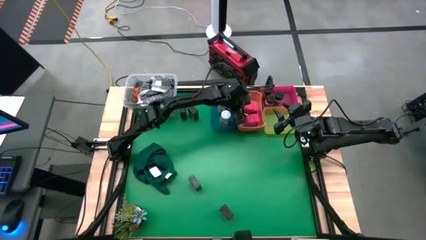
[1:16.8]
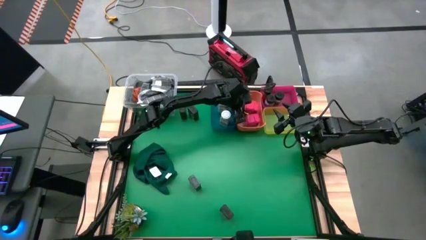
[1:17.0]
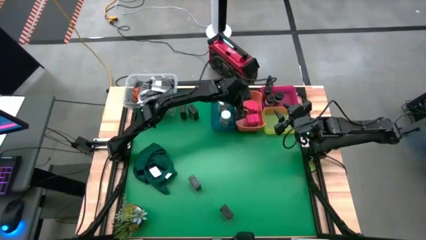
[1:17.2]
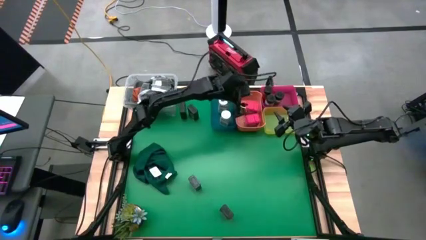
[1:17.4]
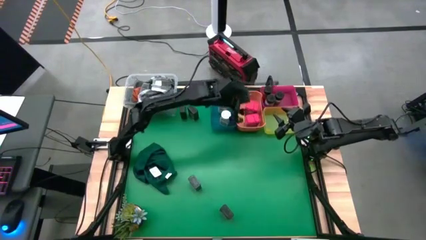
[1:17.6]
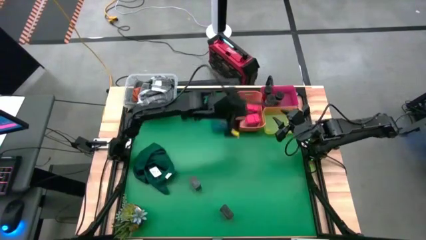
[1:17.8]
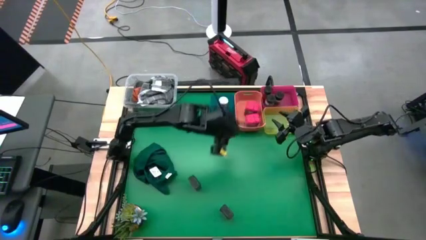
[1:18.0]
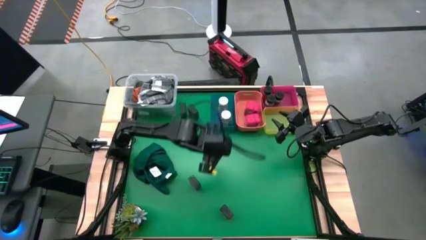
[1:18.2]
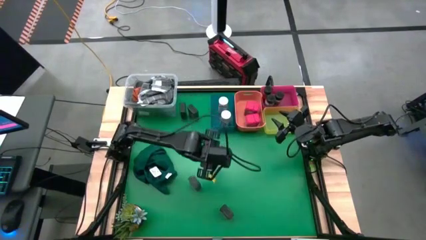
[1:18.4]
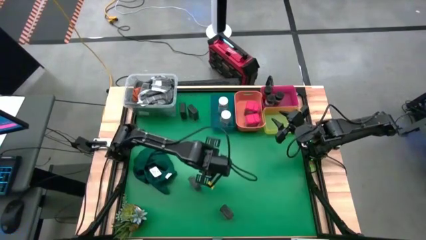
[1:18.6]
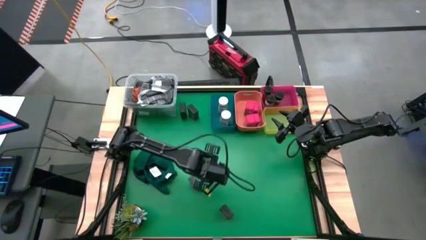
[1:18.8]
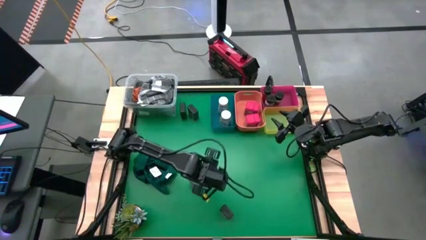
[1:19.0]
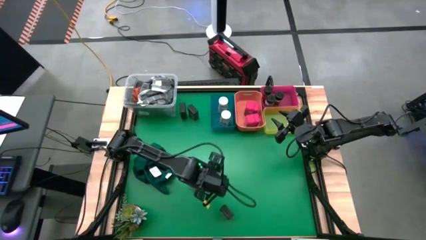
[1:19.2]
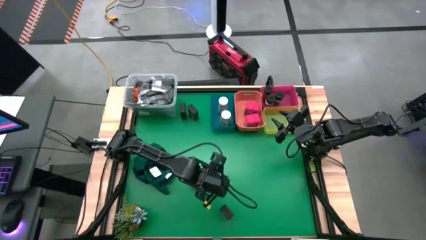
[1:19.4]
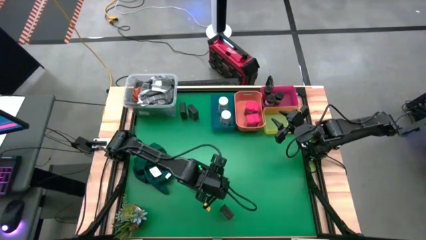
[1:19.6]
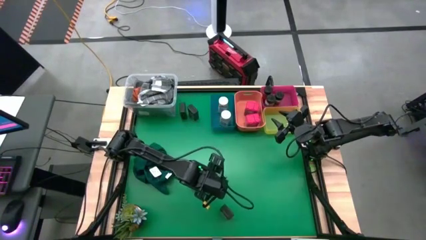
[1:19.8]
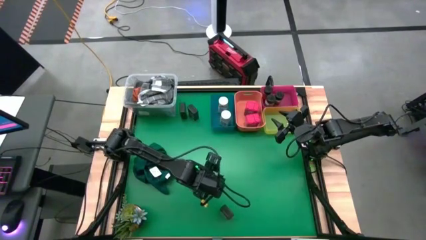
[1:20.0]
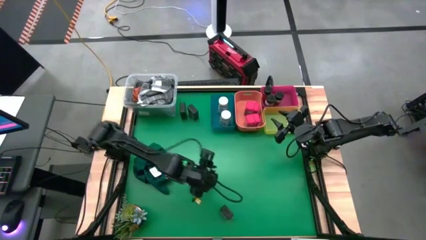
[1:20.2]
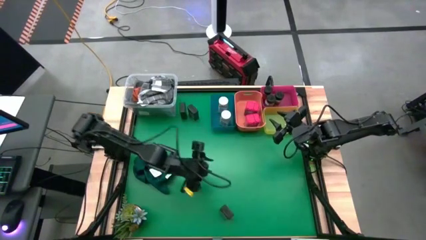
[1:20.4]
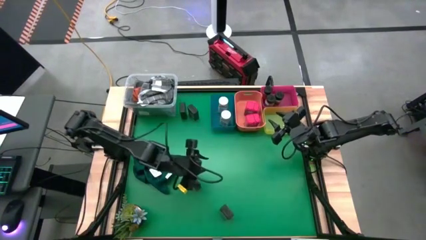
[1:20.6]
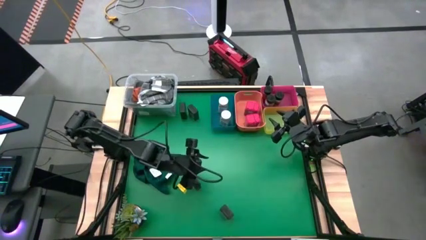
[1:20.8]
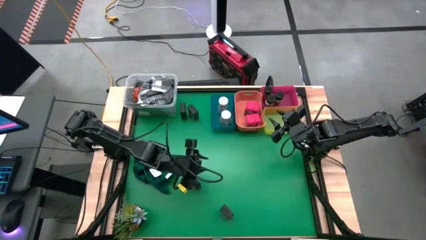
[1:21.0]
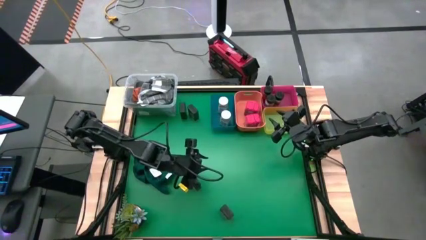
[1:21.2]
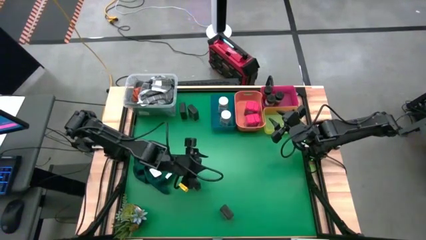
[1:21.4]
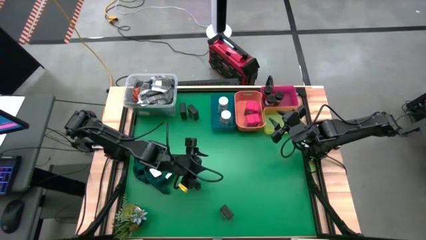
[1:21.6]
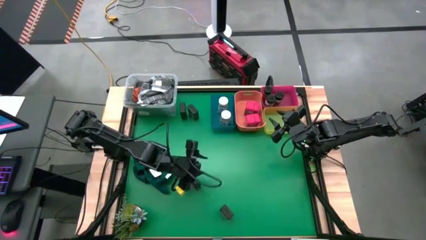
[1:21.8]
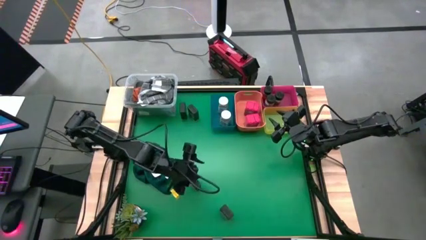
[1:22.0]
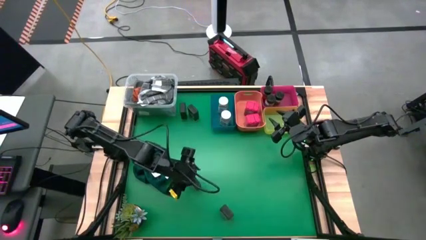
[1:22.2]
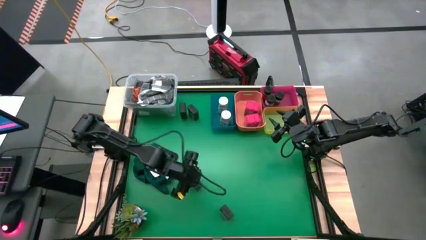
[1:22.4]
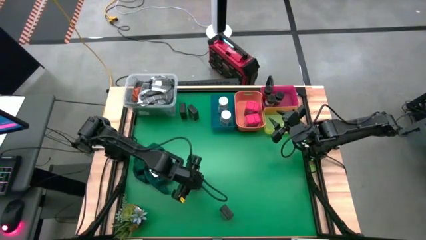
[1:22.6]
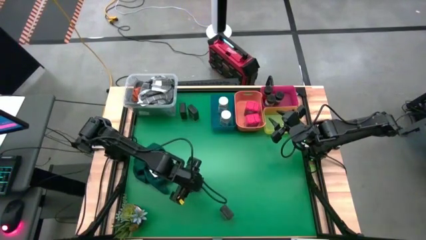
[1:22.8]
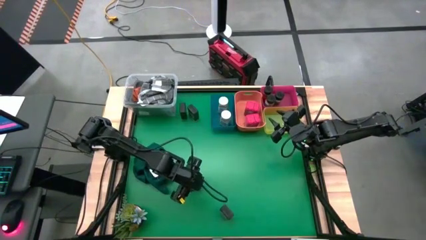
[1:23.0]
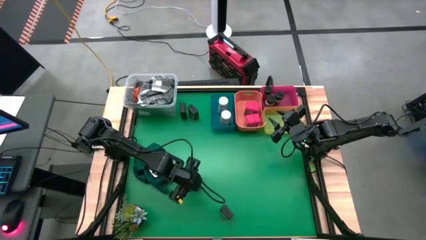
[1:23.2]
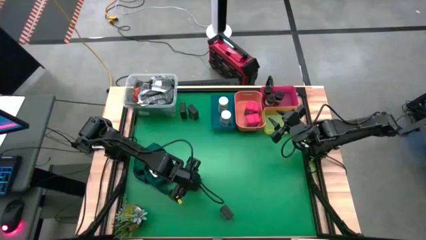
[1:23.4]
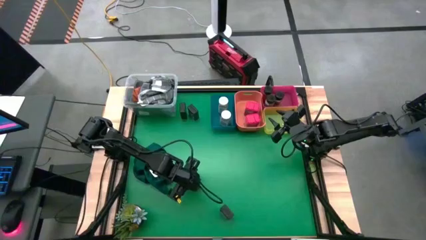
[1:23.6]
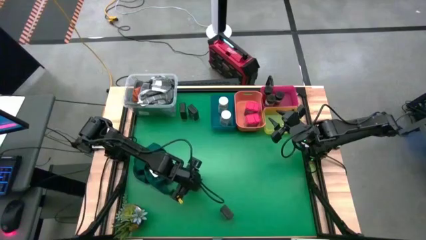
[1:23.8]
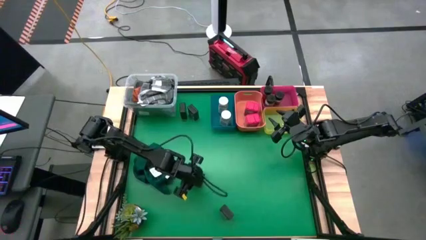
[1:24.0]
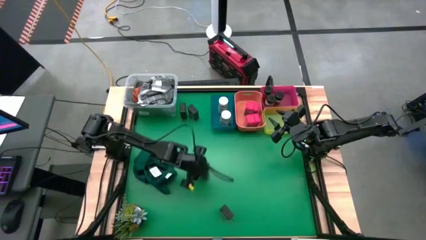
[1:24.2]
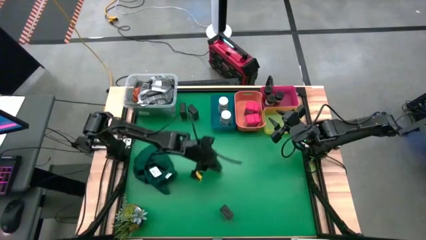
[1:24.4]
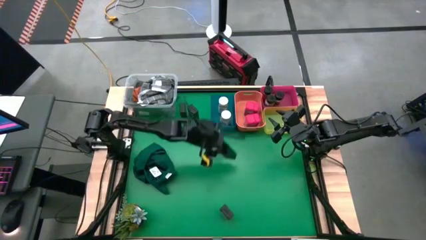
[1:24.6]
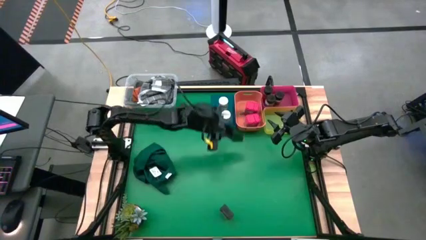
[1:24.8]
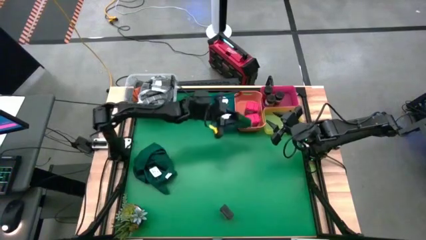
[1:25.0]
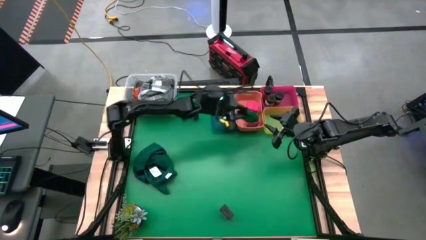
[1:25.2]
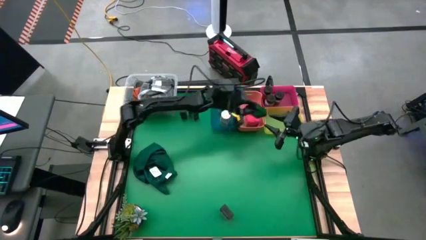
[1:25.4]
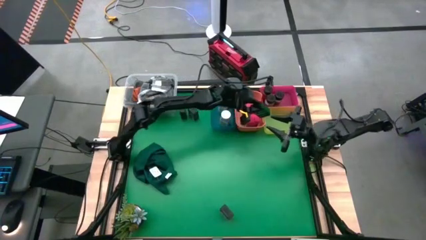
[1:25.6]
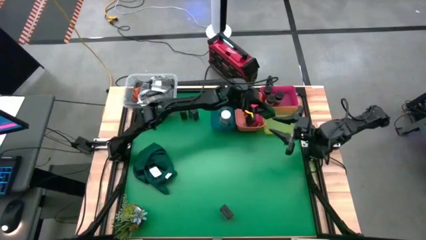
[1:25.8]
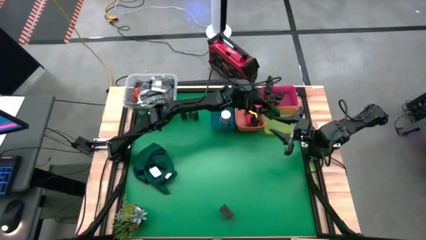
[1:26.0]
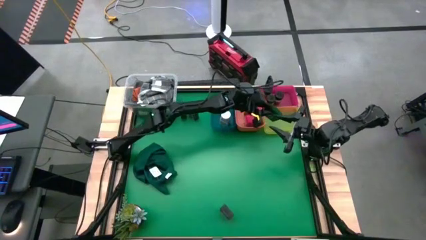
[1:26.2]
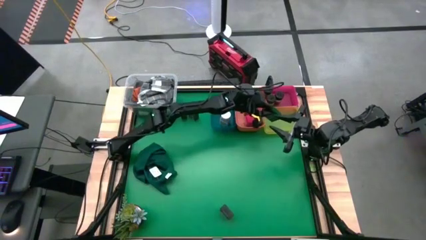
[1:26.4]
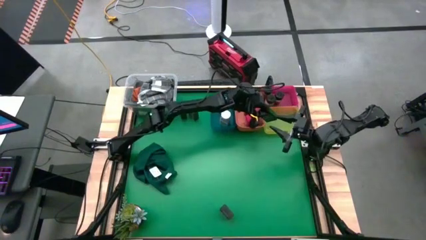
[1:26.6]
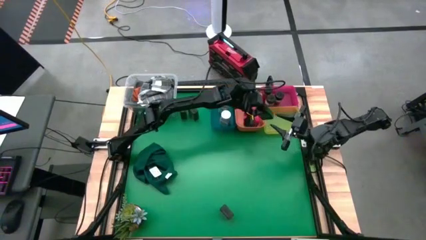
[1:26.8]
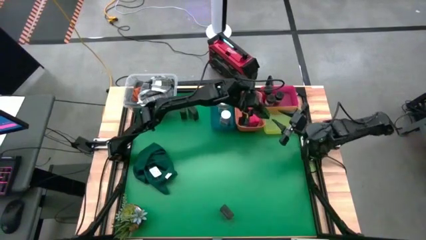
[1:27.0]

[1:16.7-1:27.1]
Task: Sort spices by type
Put the black seasoning can into the yellow bin

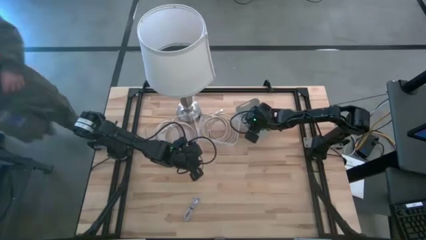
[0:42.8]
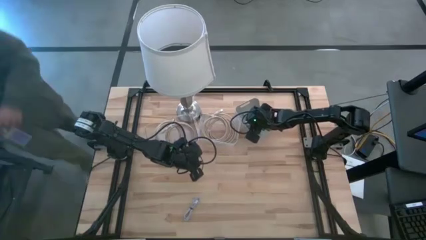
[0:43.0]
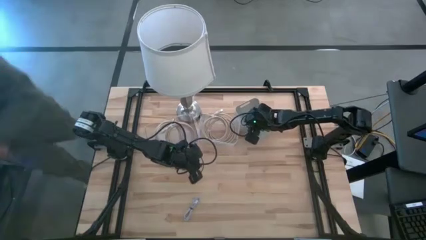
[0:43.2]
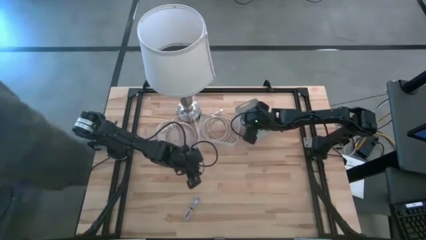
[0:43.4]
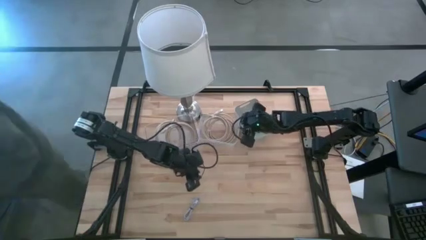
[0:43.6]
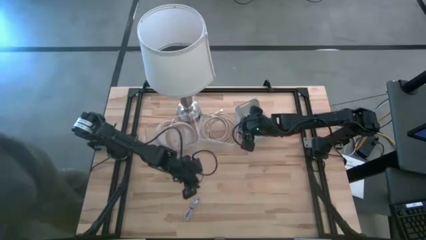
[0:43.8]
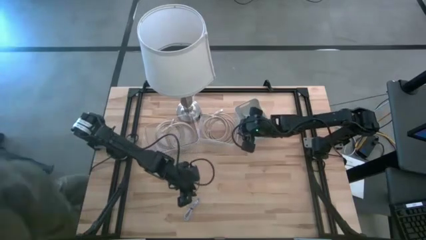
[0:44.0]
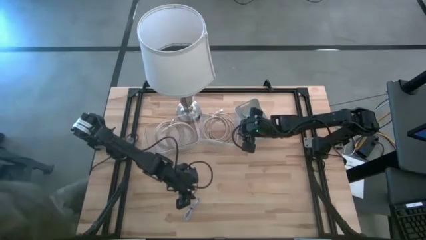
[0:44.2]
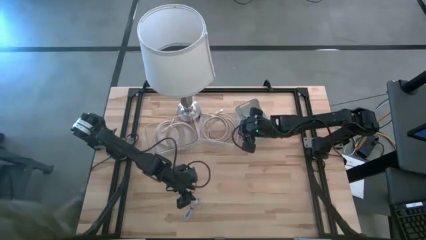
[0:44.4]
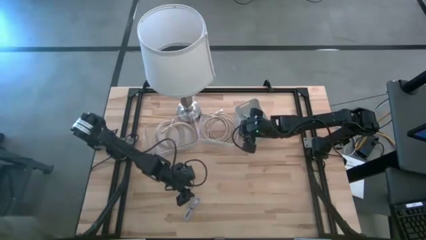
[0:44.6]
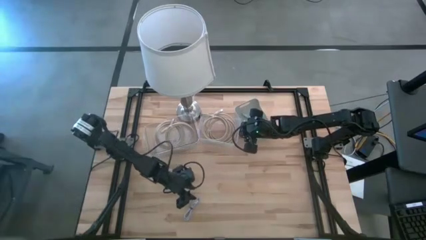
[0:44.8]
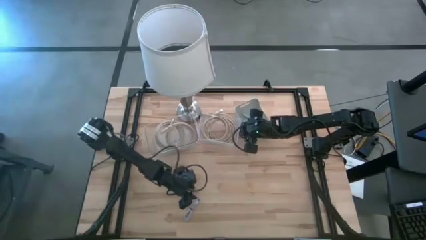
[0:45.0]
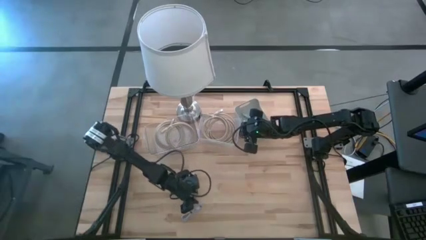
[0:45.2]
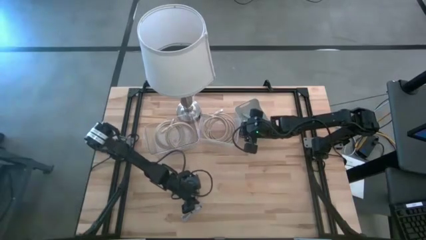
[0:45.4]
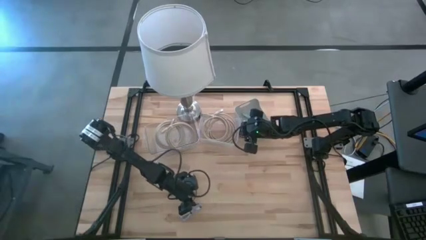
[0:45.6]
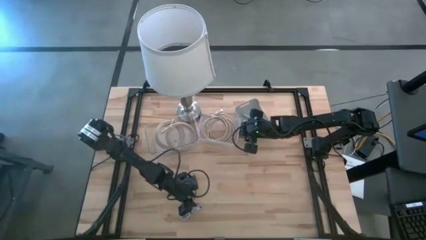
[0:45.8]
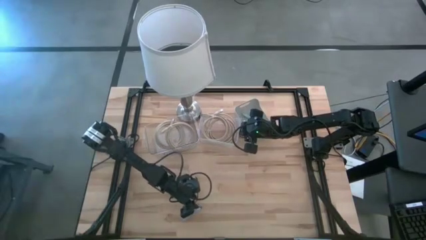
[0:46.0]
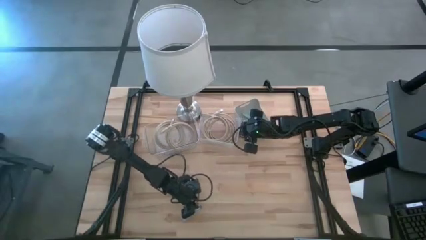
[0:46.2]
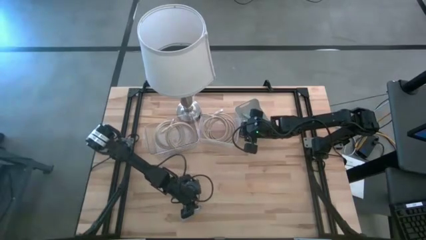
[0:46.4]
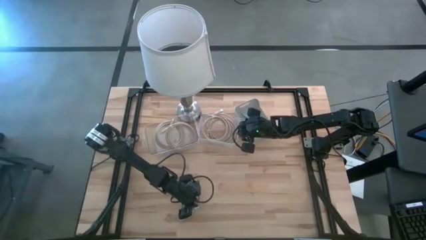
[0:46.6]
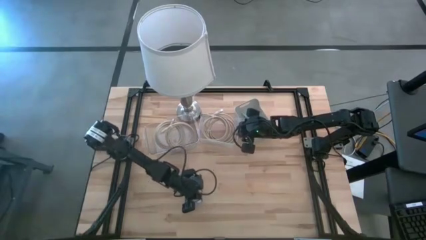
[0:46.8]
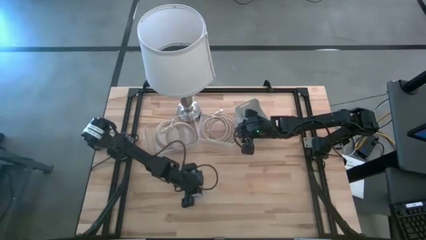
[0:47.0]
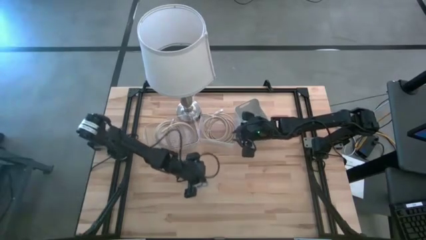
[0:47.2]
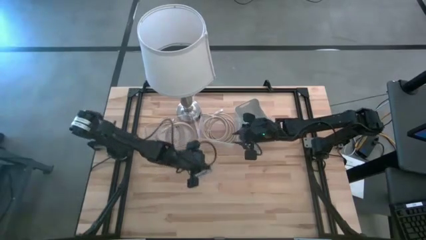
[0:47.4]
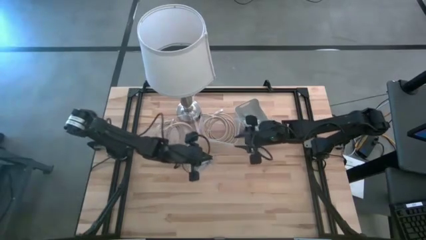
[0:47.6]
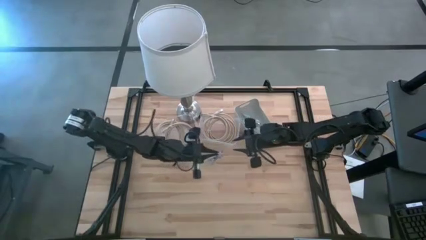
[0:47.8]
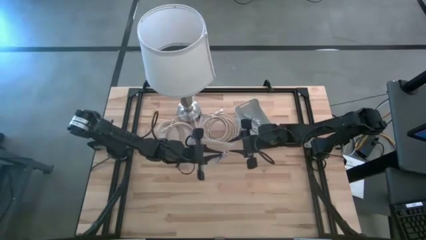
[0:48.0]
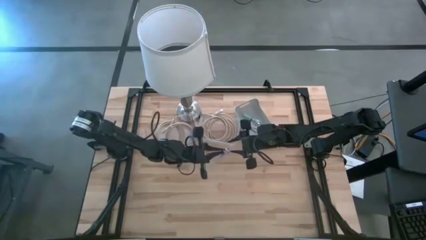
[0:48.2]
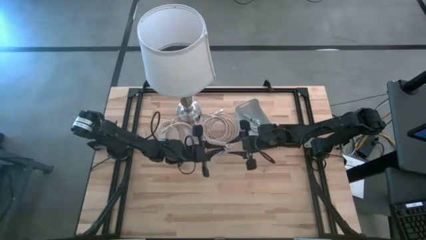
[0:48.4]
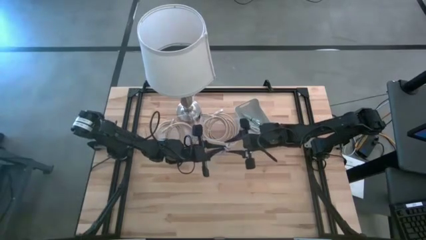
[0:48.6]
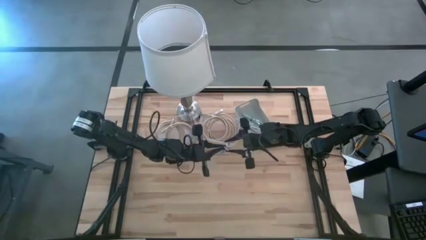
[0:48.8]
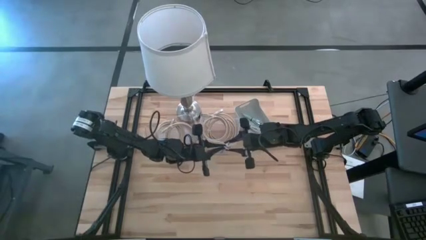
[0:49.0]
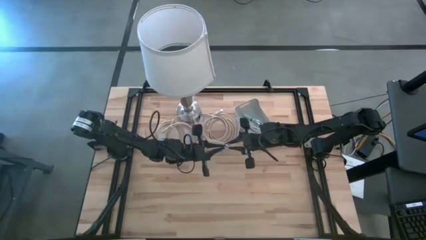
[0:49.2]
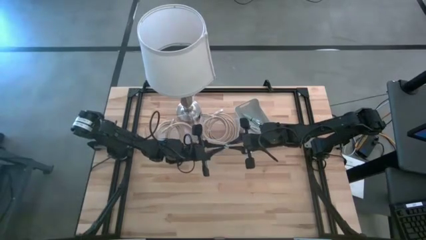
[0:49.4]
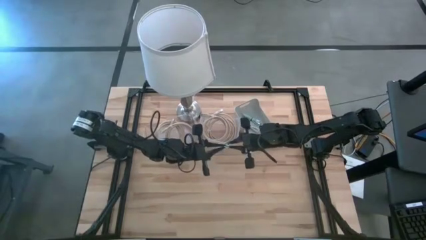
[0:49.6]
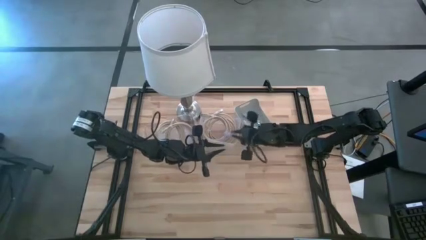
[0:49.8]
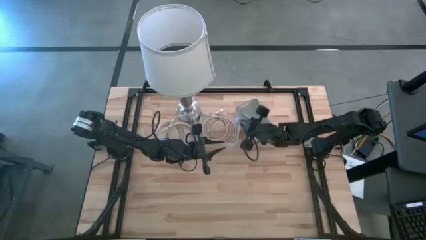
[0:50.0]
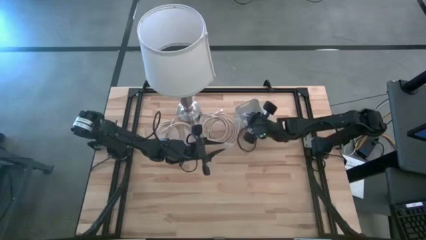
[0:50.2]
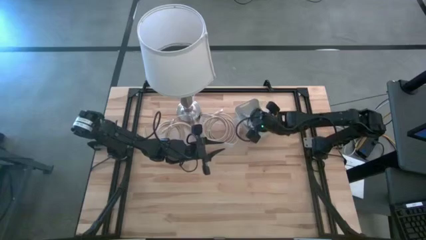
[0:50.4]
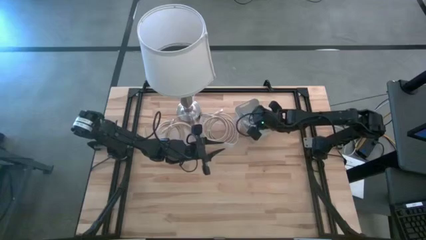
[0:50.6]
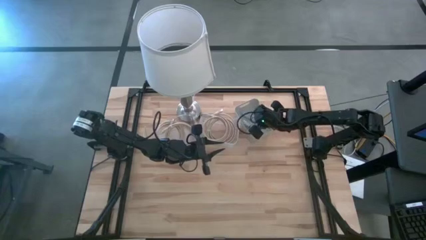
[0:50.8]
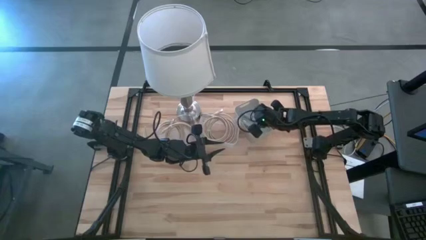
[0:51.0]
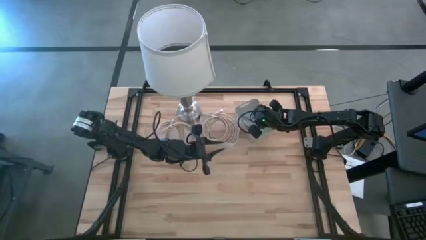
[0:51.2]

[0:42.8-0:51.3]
Task: Pick & Place USB Port
Put the violet USB cable into the gray bin
